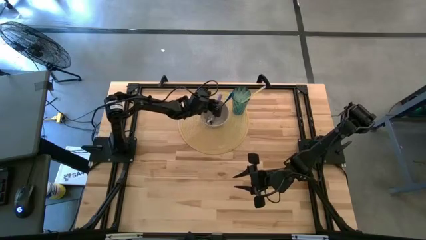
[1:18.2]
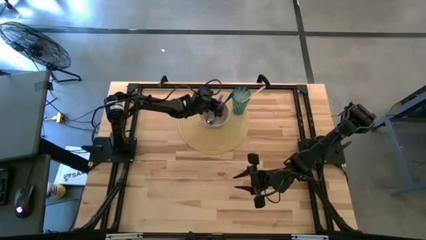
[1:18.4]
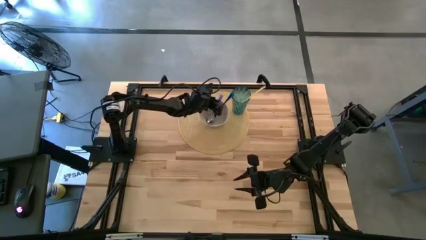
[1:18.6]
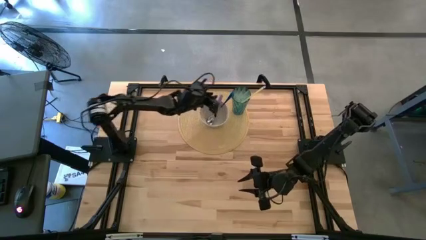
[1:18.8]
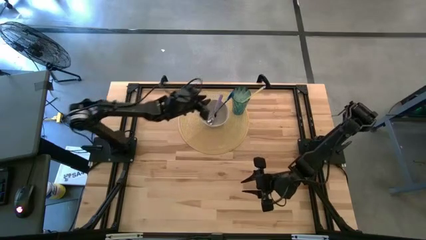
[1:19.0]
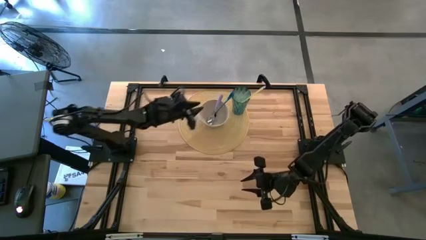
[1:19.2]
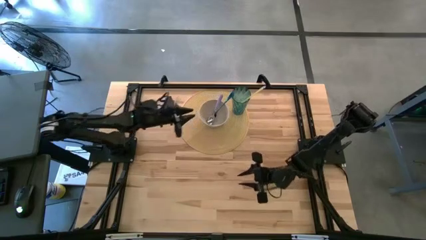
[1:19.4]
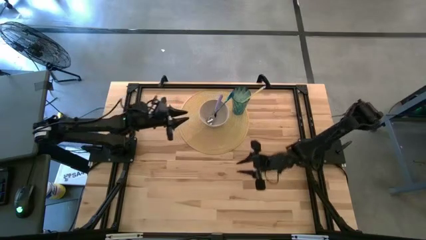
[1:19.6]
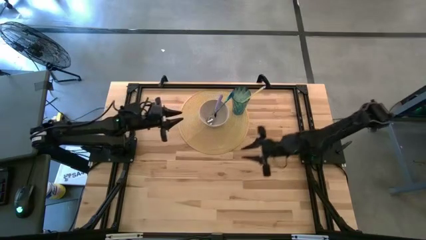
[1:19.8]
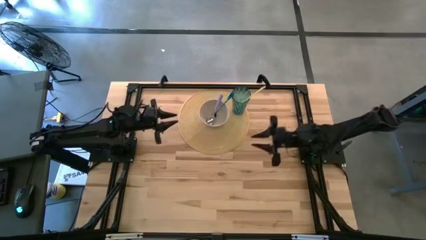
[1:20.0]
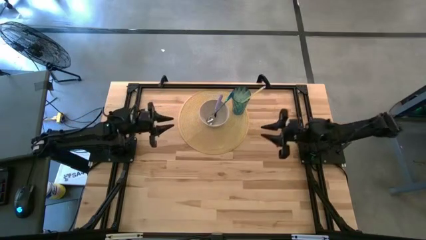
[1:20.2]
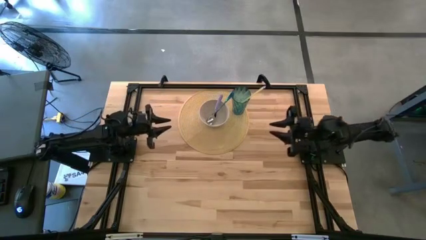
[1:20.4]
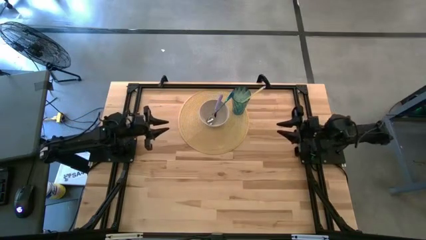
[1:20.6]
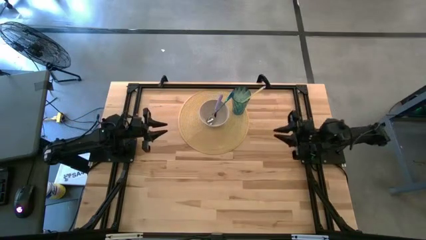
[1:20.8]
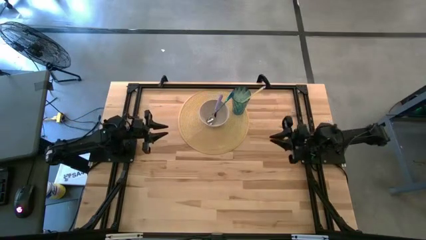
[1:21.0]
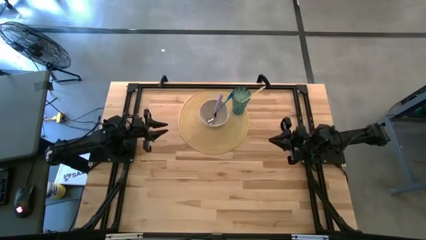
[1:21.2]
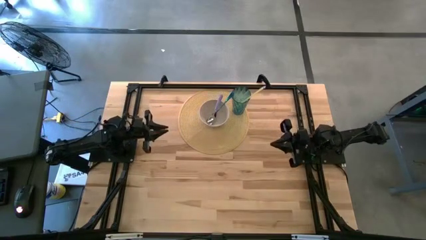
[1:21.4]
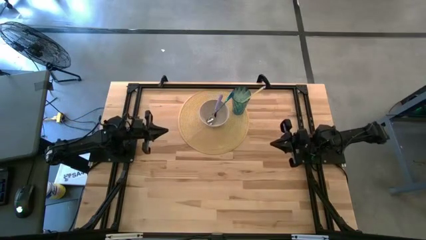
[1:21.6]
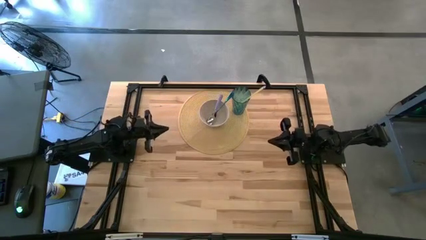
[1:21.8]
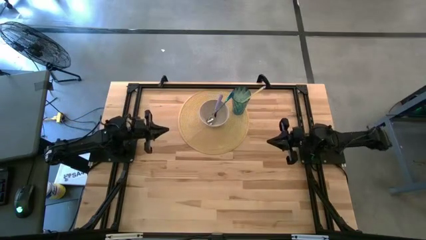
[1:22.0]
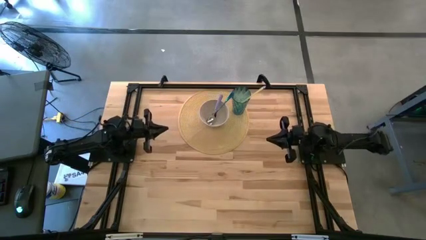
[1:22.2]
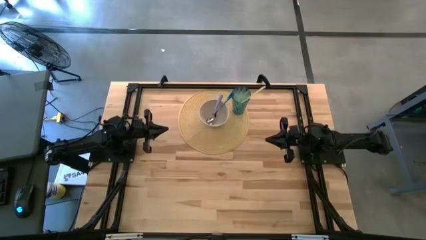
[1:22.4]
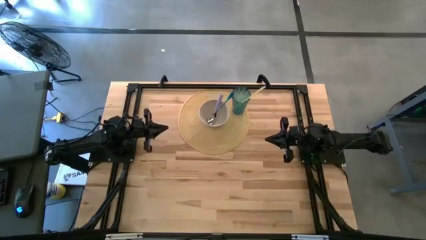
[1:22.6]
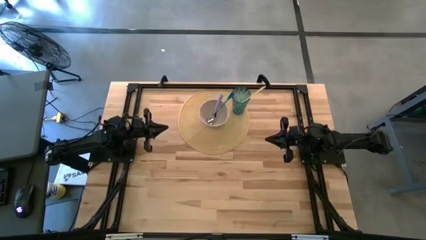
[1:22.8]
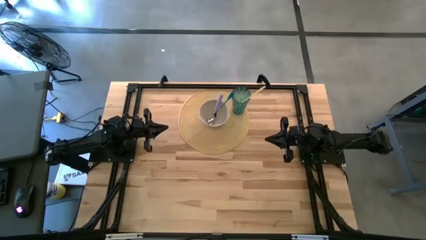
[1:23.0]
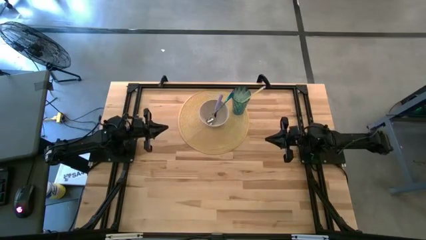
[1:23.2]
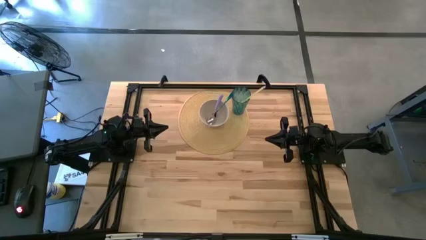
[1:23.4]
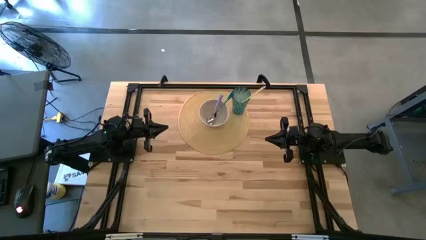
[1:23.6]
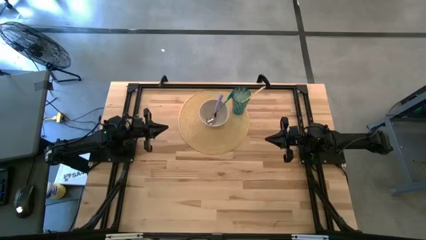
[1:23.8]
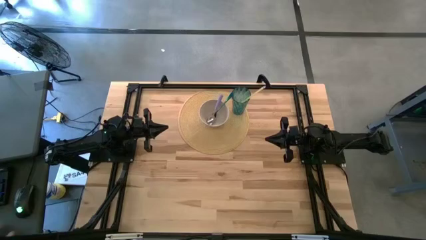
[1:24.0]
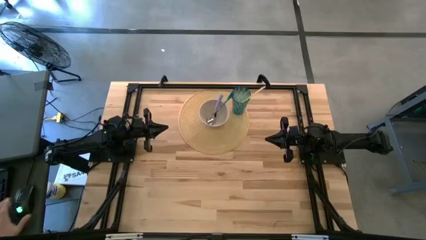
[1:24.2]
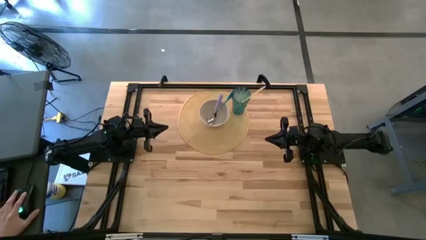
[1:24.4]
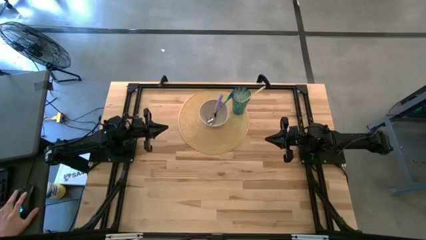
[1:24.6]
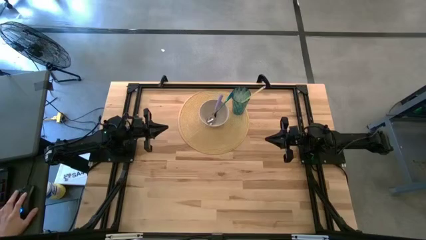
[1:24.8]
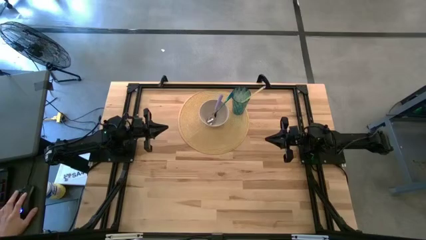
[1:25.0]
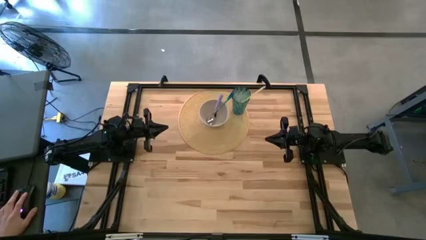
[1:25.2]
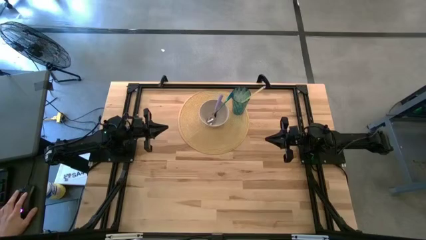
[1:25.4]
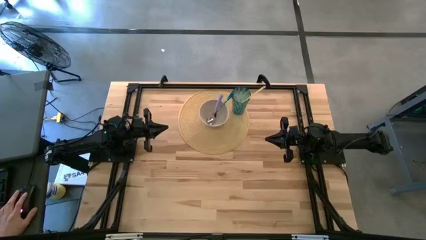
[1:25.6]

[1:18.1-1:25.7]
Task: Pick & Place Utensil
Return to Home Position

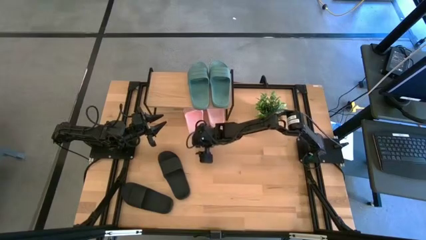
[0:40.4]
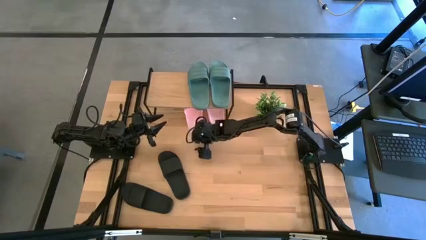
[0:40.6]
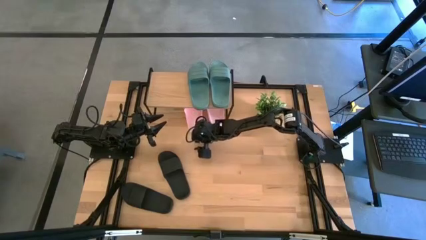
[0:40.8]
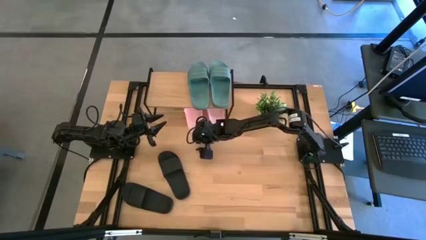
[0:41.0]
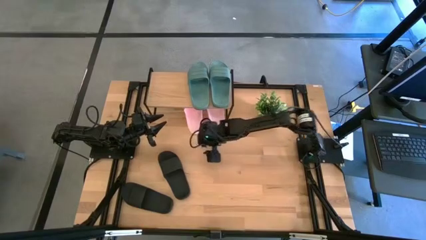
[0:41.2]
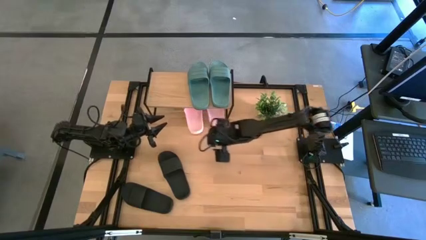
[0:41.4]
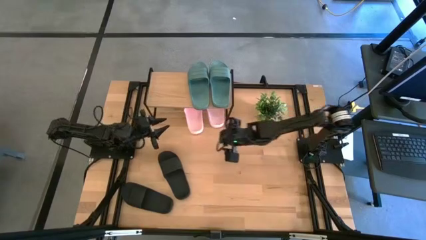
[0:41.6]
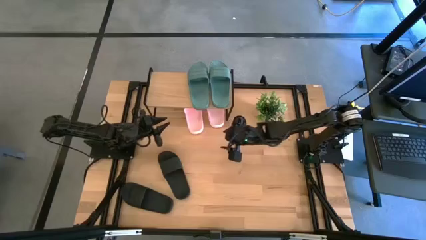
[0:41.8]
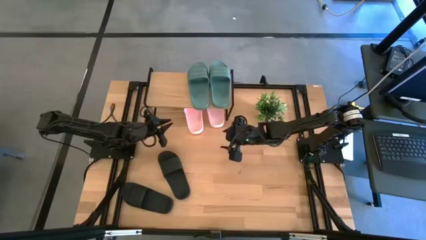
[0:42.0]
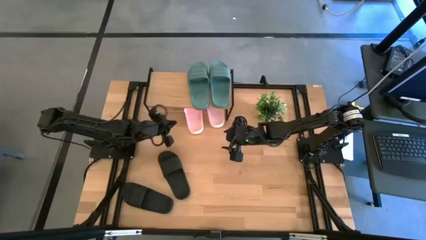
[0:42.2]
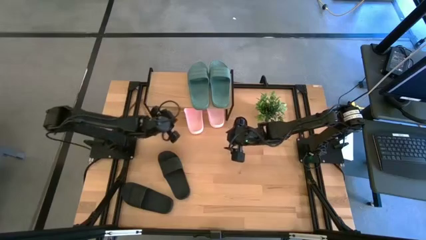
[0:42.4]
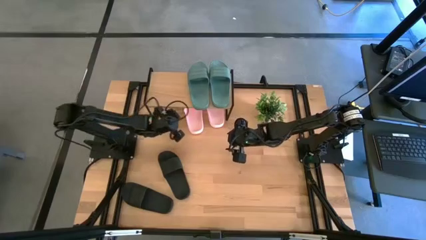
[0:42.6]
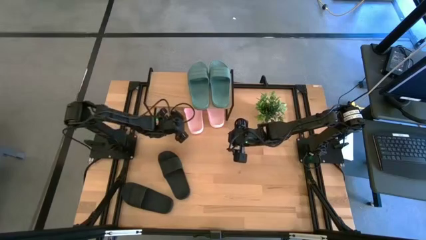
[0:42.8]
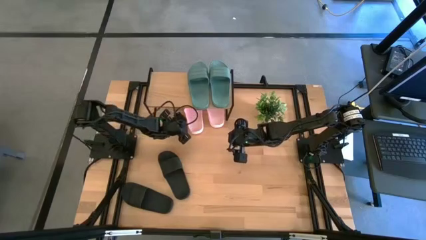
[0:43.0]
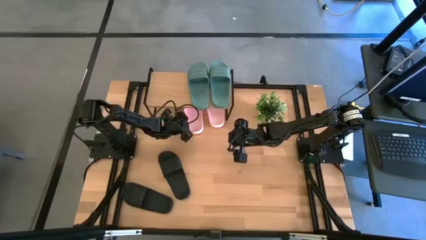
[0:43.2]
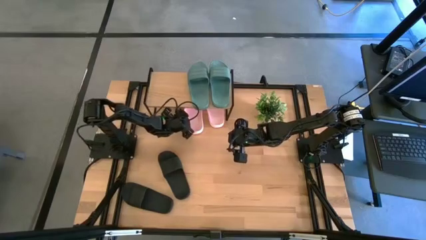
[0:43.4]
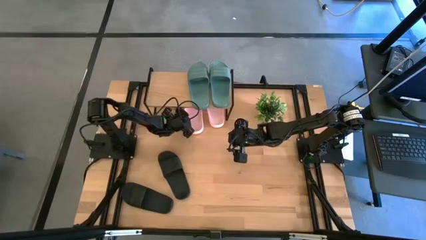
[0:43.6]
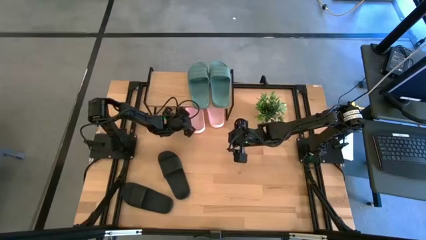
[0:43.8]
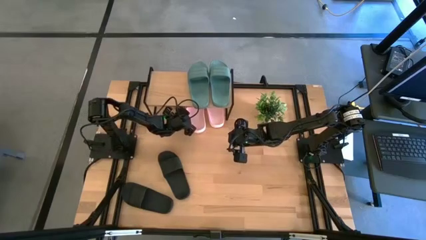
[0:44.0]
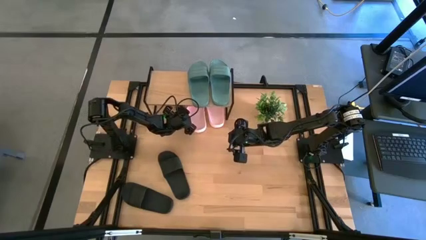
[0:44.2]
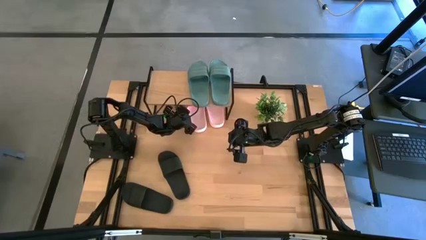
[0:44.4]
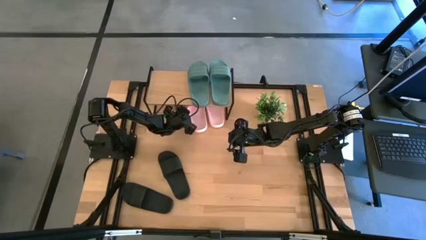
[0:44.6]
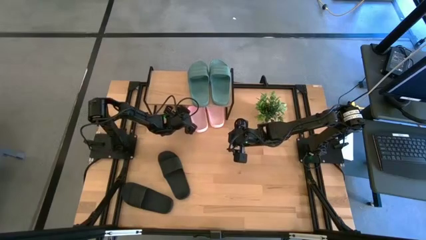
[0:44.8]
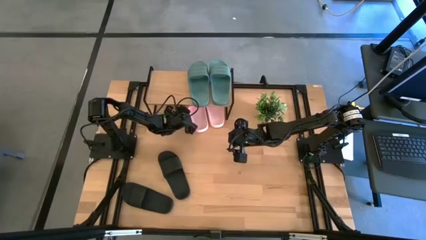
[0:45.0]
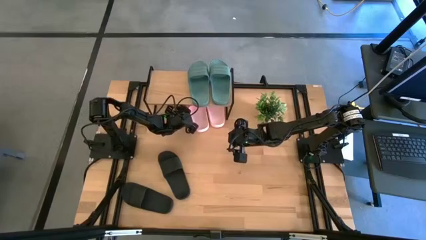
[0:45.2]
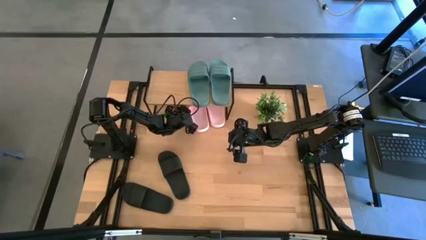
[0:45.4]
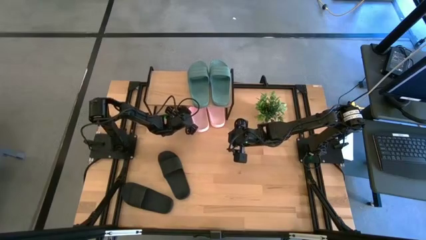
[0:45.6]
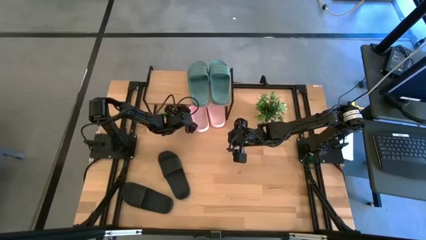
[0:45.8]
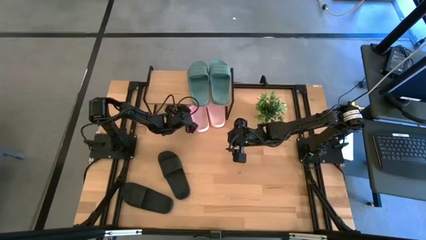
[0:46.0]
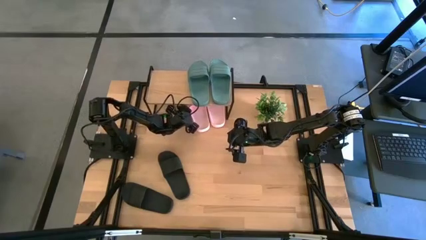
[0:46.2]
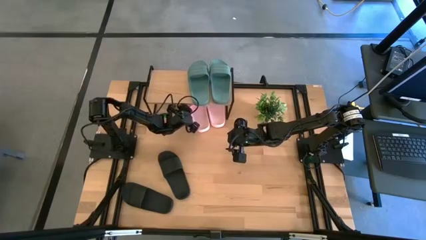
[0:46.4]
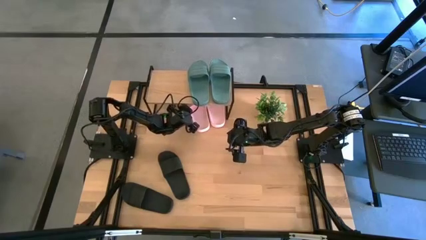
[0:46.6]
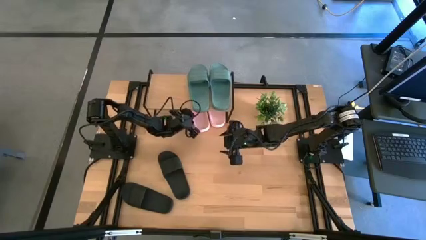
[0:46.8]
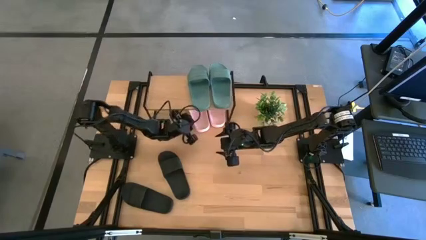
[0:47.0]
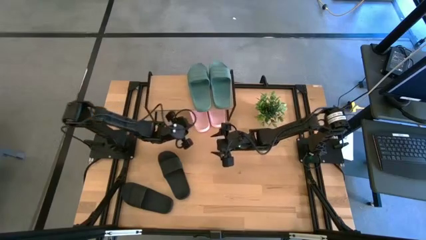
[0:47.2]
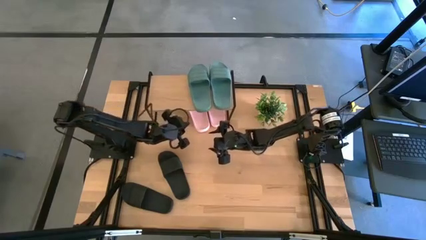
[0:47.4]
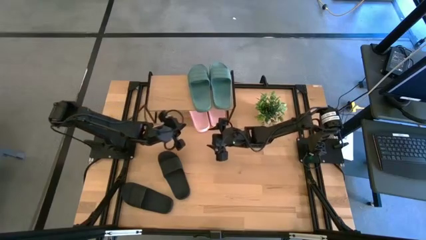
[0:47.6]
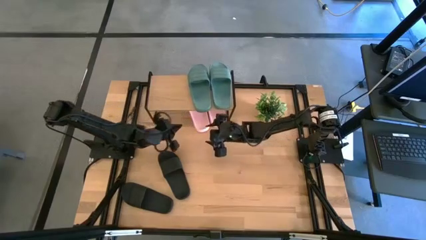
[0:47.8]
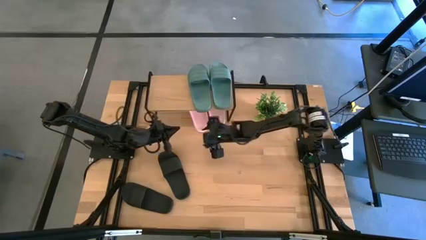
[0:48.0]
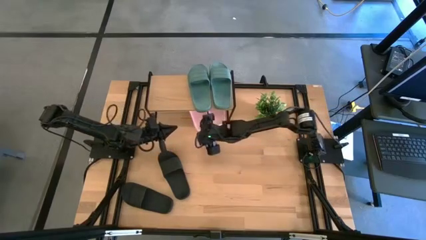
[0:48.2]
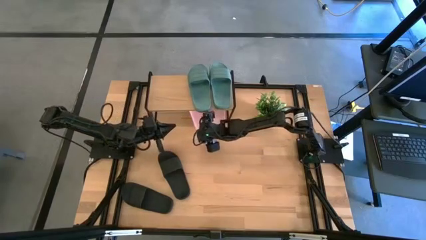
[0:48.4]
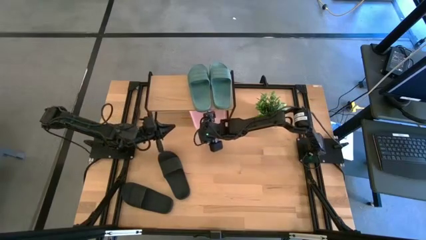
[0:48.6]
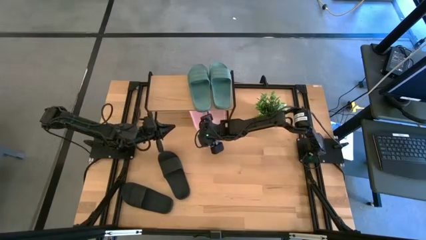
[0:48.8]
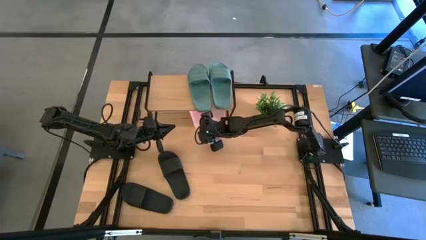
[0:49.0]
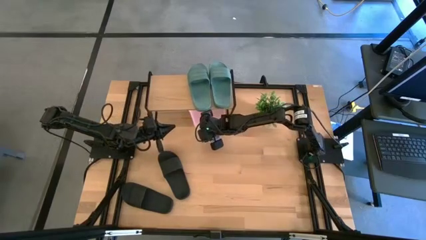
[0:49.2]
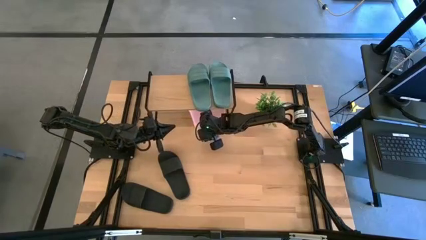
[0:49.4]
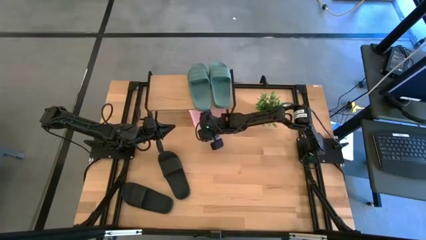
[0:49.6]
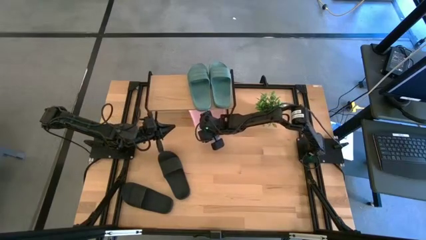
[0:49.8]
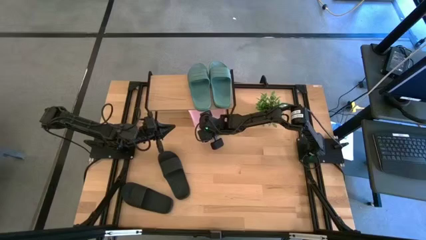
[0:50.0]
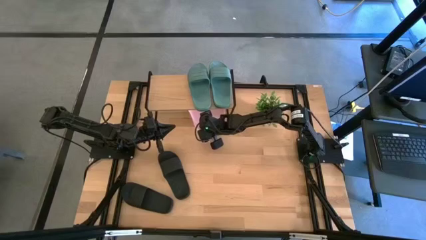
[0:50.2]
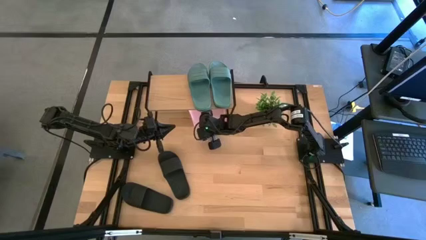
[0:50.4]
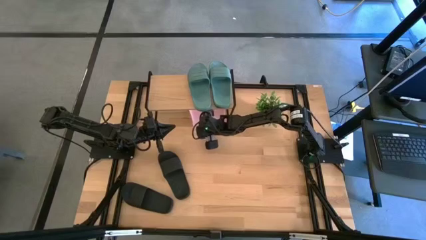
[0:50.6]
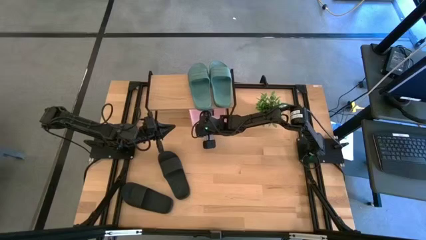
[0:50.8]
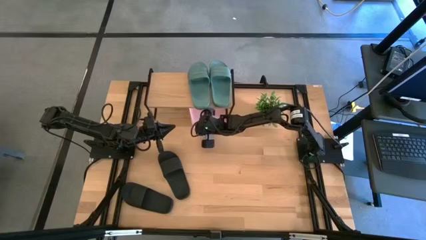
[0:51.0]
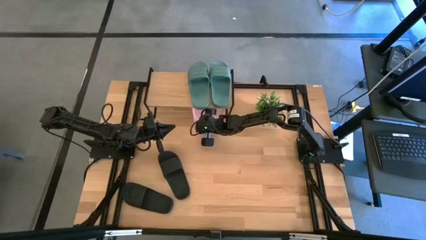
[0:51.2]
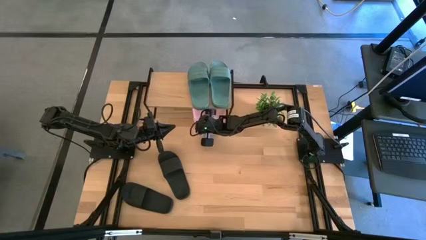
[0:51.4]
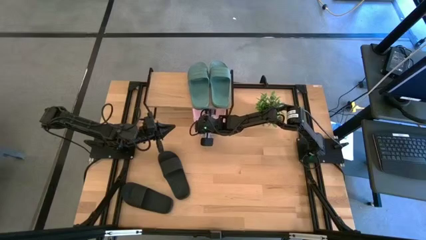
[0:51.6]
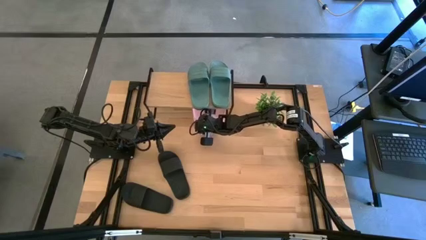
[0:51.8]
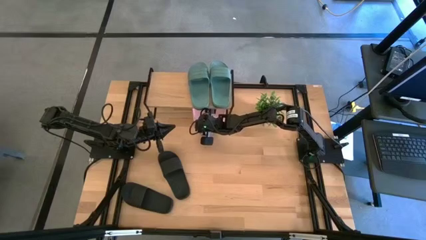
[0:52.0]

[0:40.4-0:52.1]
Task: Pick and place slides into the shelf
Put the pink slide under the shelf
